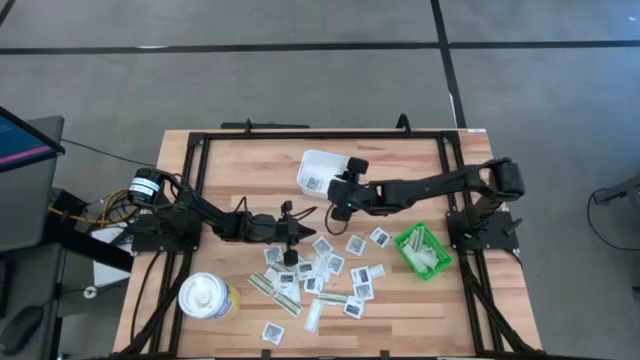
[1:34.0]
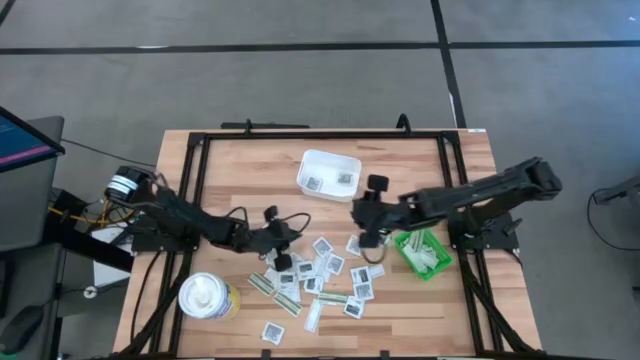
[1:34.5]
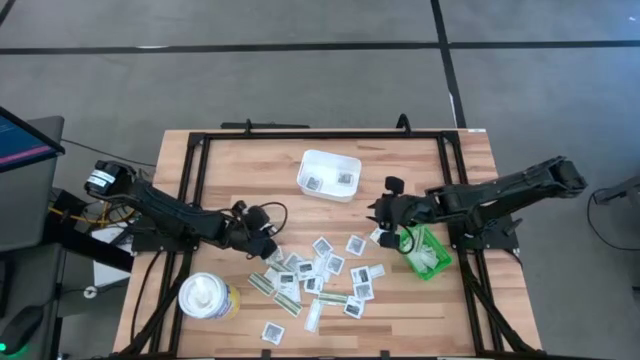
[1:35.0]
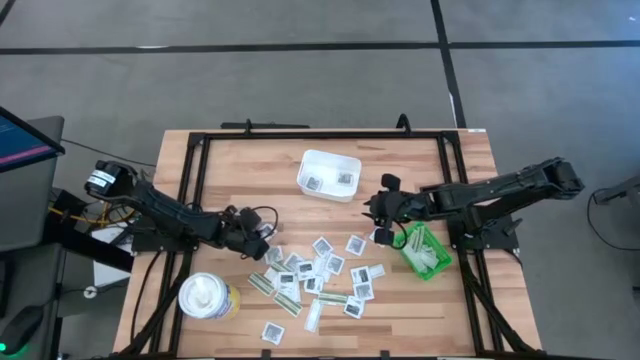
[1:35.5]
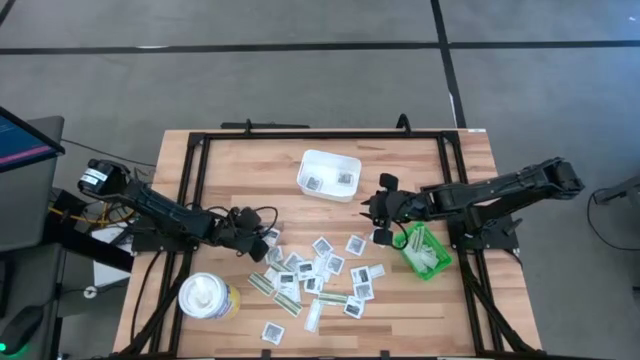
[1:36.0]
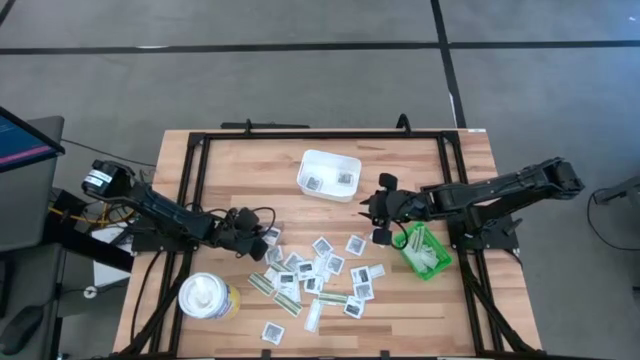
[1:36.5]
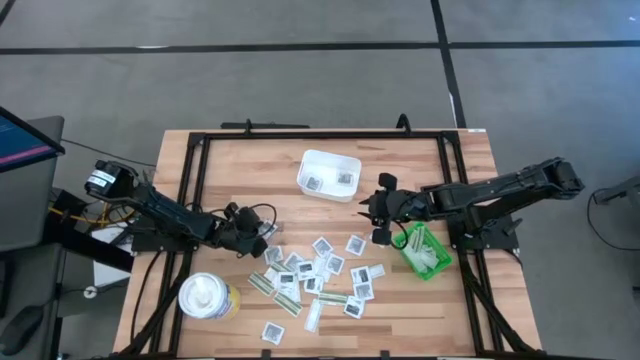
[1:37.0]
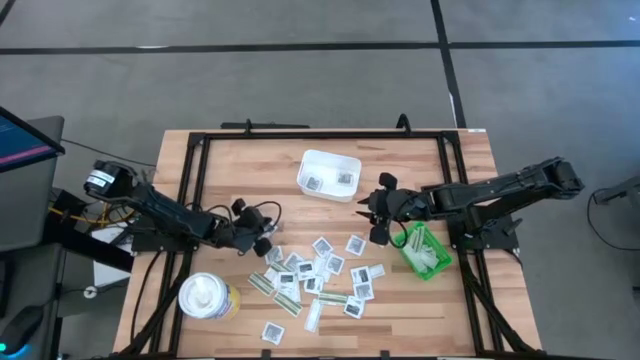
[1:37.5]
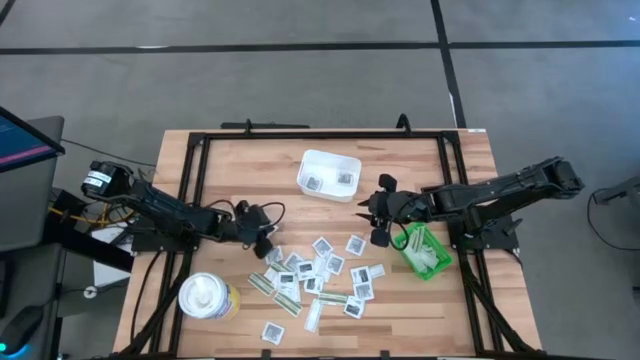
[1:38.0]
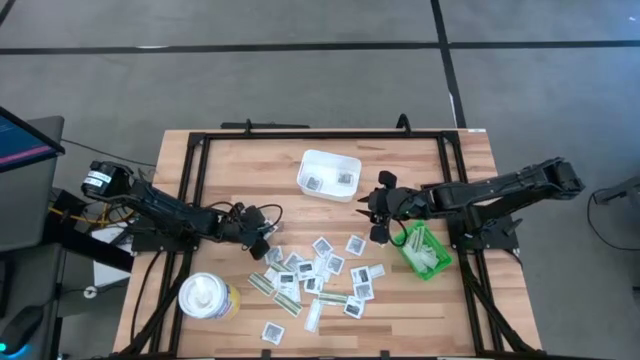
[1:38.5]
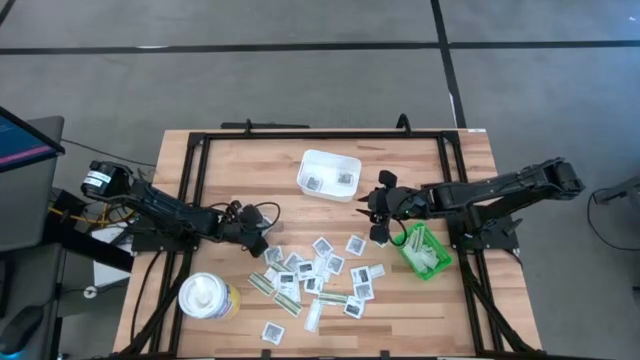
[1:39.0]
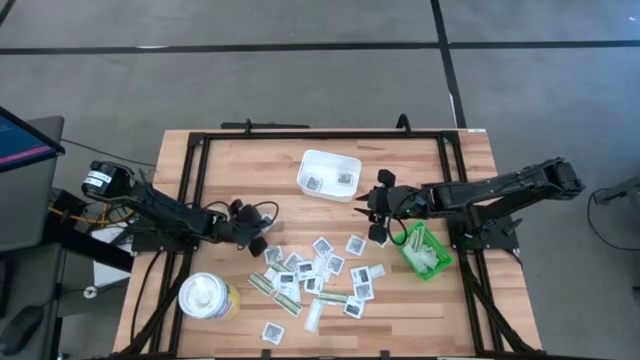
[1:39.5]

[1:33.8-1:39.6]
Task: Pick & Place First Aid Supplies
Put the towelette pack into the white bin

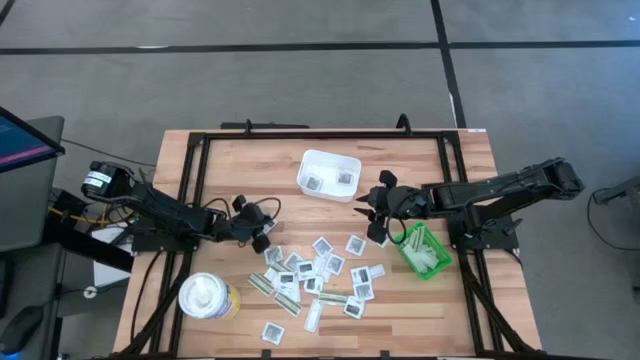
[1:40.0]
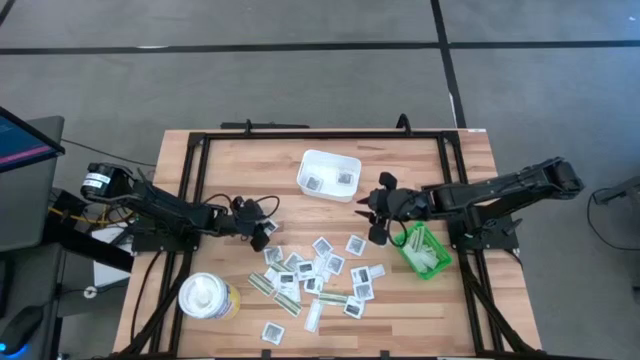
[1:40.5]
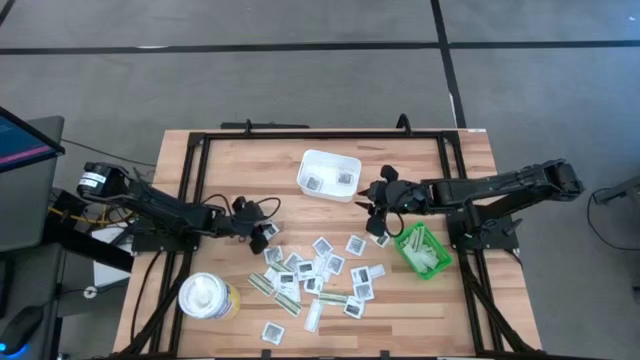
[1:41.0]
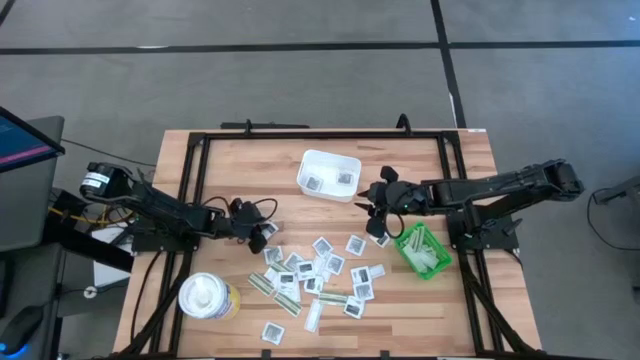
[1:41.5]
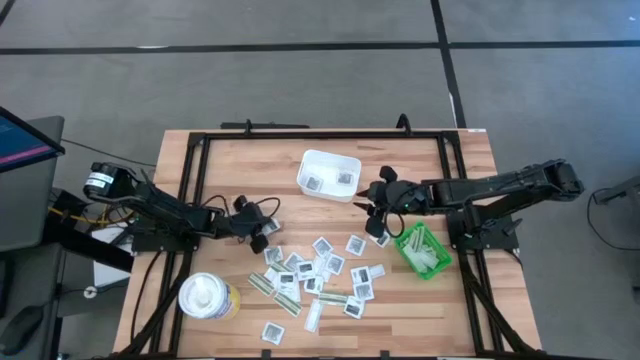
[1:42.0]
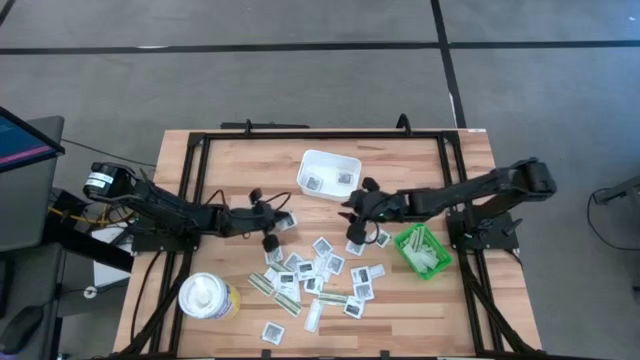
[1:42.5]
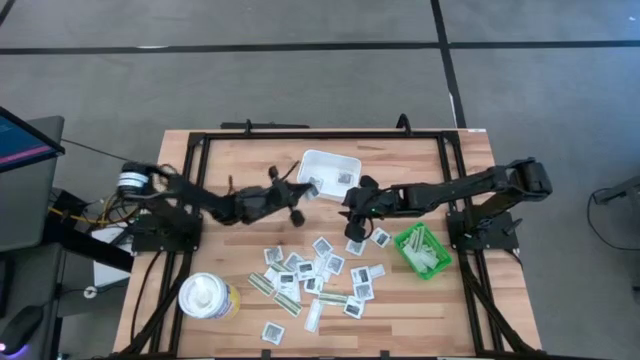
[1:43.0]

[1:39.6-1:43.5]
Put the towelette pack into the white bin

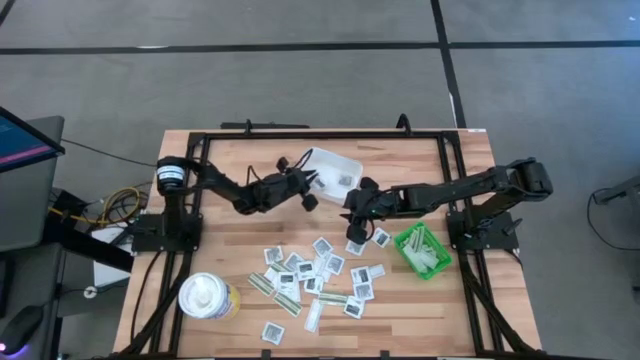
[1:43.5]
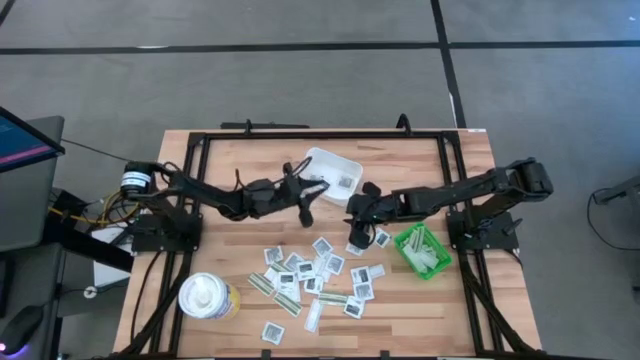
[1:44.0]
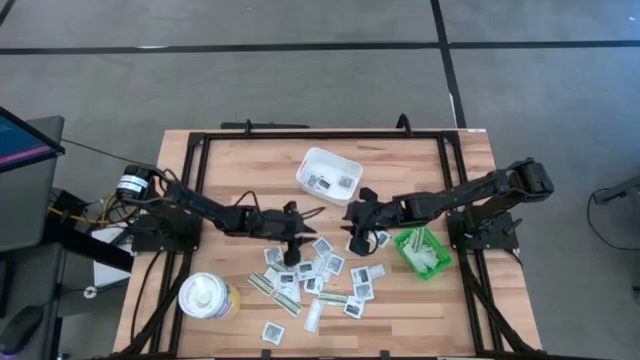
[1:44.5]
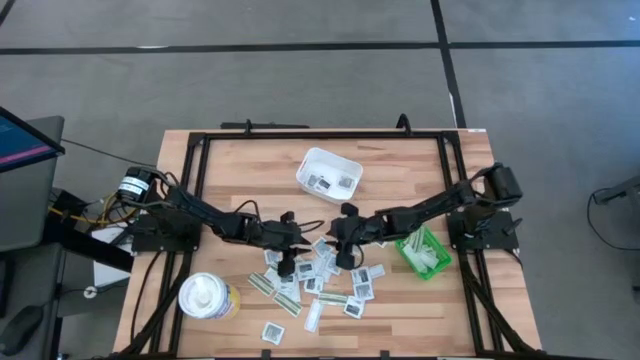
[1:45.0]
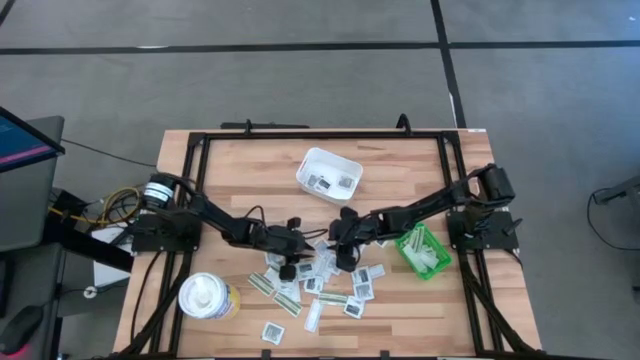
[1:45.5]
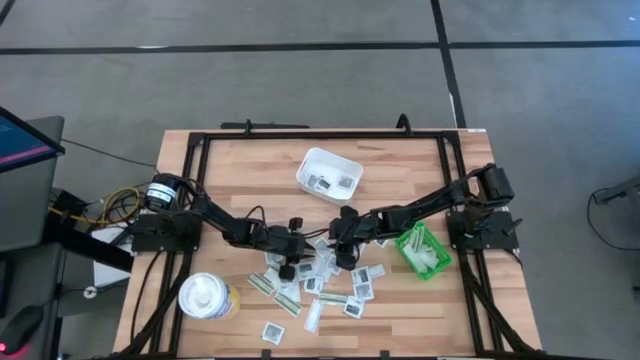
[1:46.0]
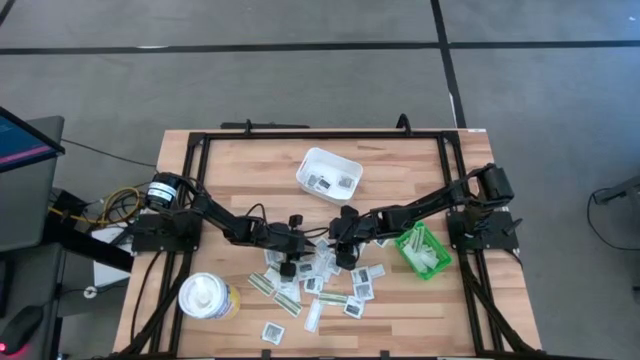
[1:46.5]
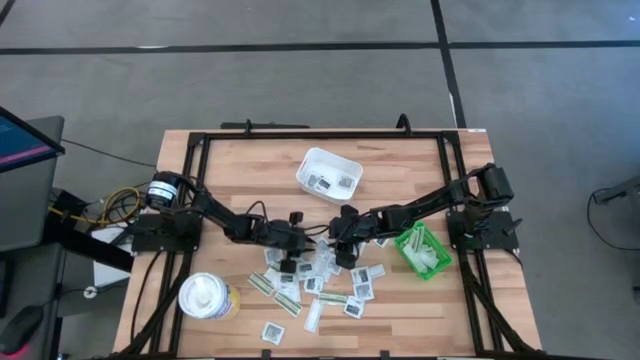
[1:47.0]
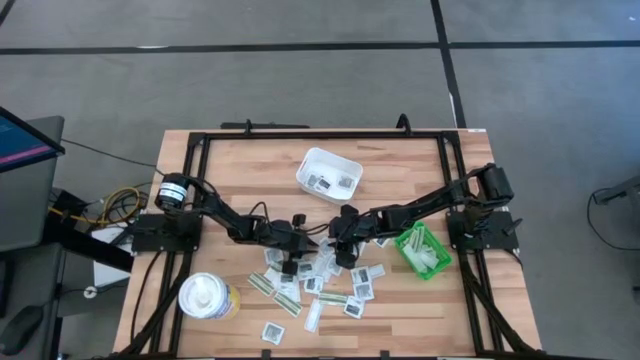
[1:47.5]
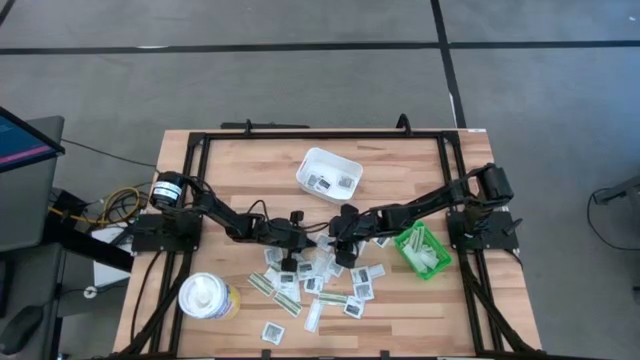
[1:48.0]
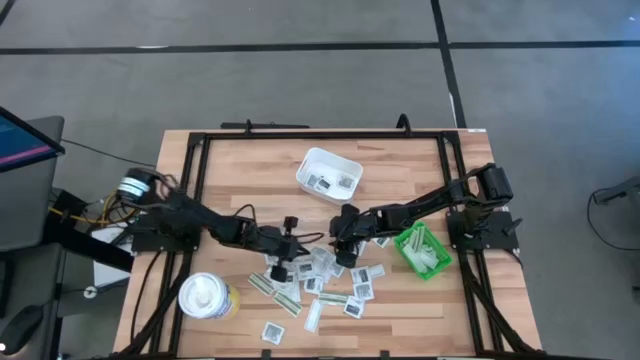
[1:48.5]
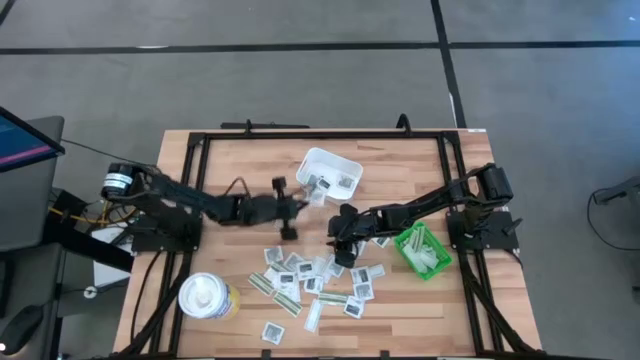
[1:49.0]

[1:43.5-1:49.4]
Put the towelette pack into the white bin

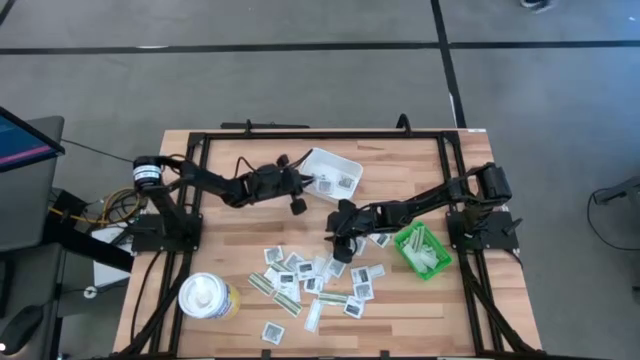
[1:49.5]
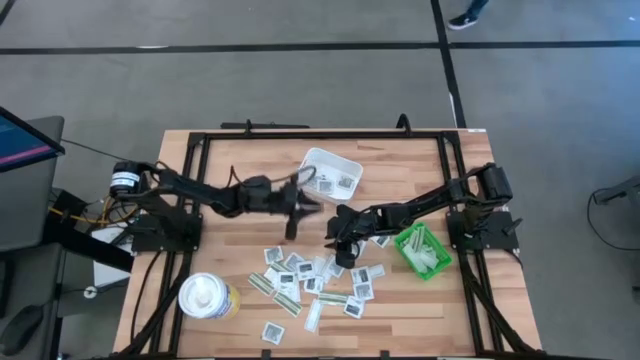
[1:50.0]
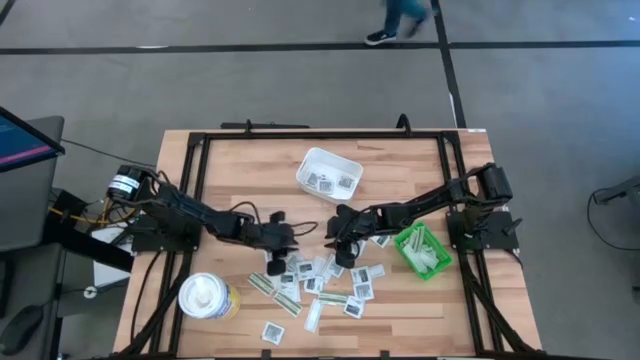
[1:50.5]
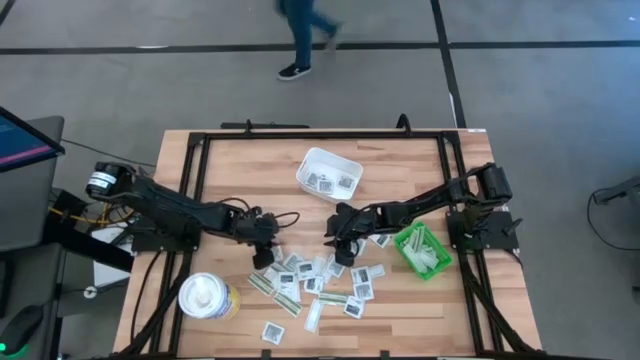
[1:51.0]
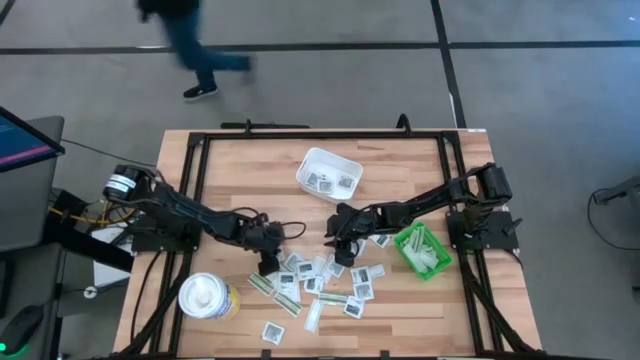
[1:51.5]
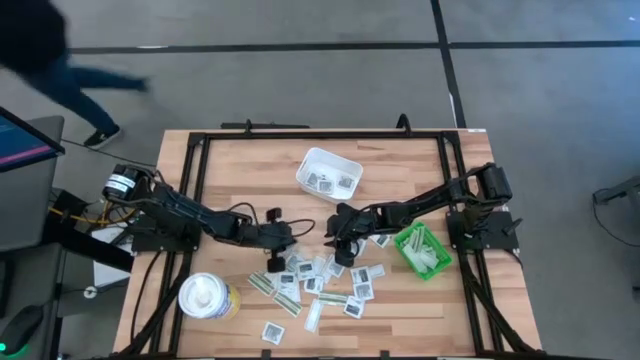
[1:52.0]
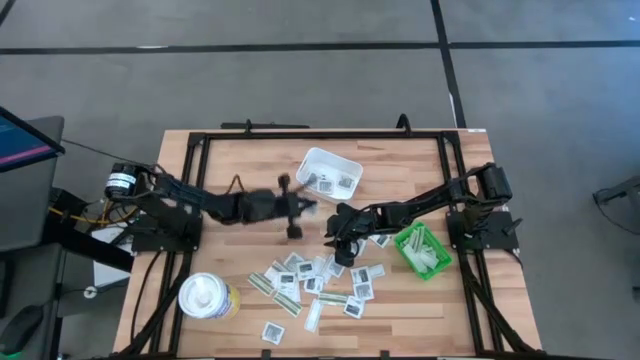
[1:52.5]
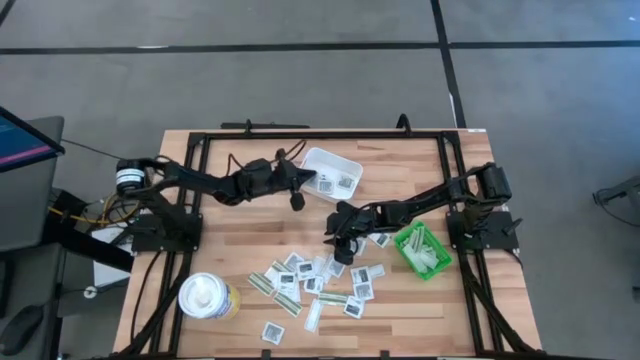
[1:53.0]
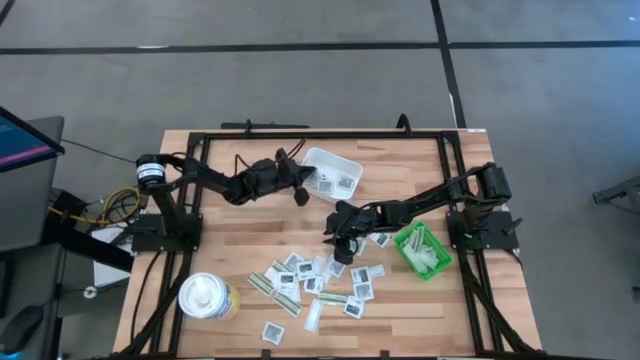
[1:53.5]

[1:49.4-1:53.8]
Put the towelette pack into the white bin

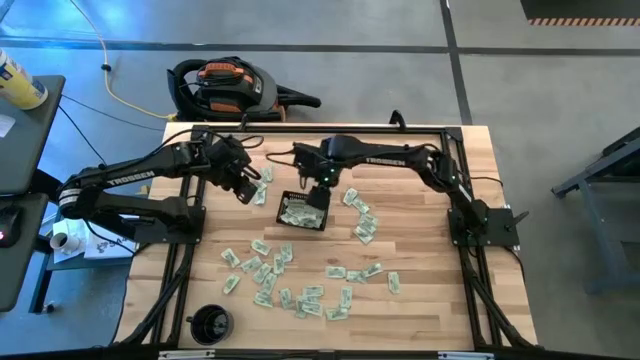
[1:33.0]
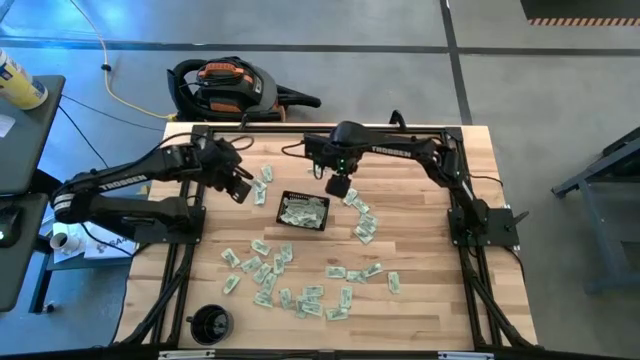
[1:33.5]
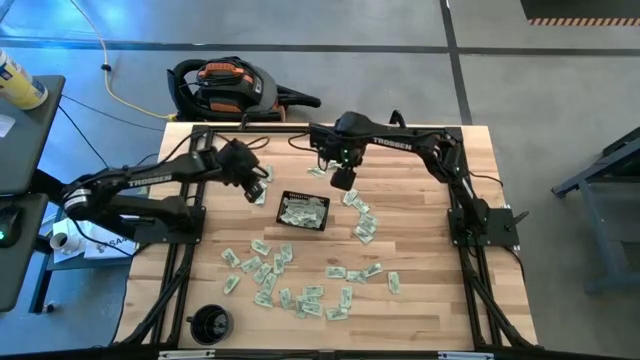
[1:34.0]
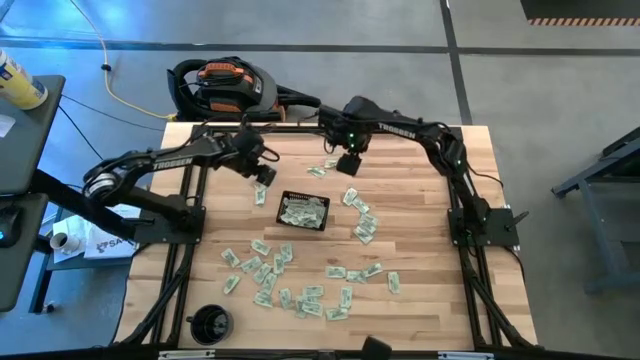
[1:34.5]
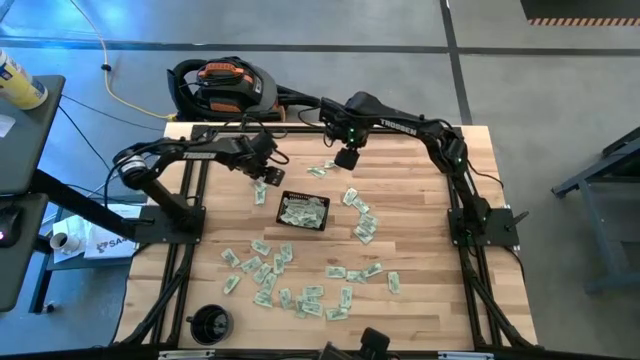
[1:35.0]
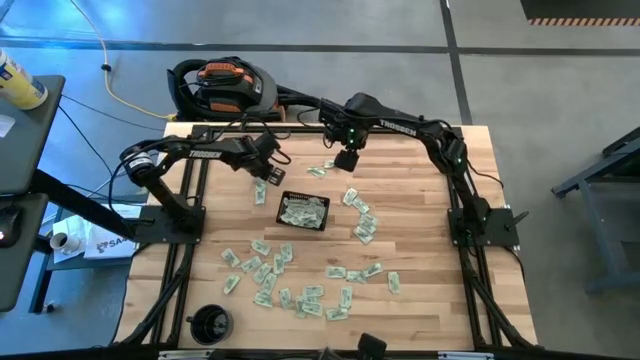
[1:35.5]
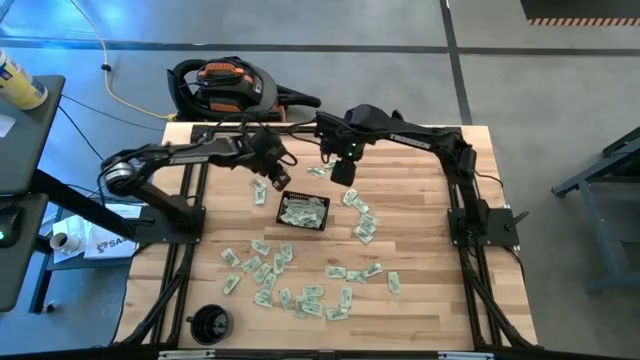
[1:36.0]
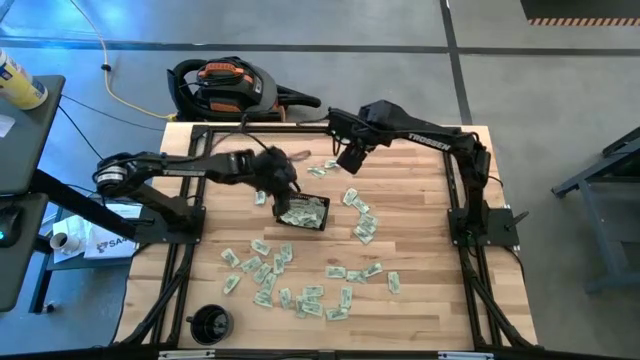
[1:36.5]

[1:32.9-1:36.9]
Task: Pick and place Stevia / Truvia into bins
Put the green stevia packet into the black basket
